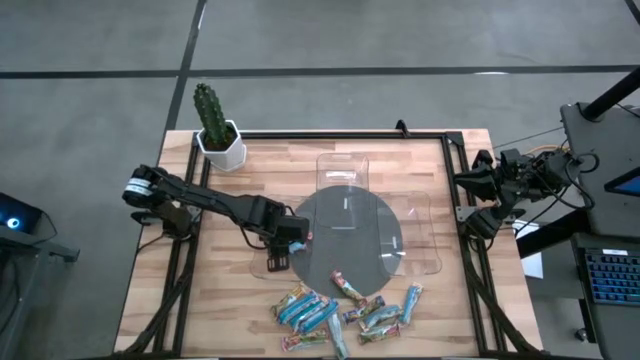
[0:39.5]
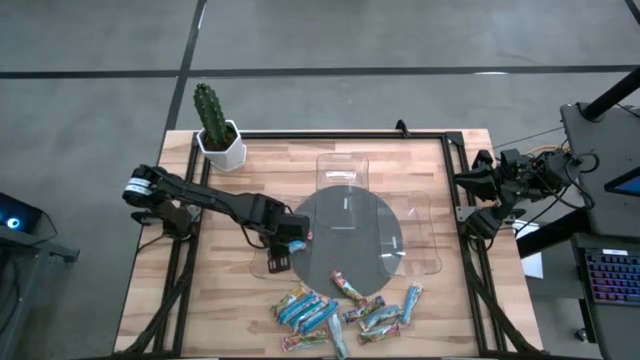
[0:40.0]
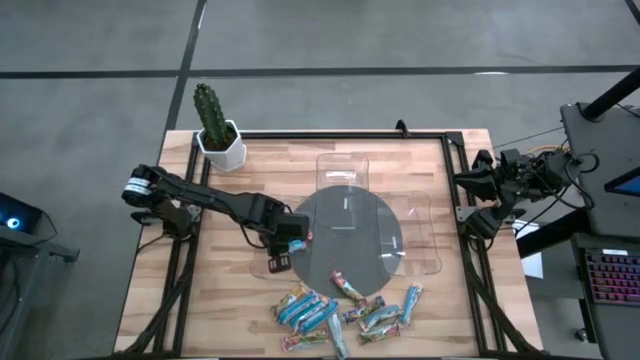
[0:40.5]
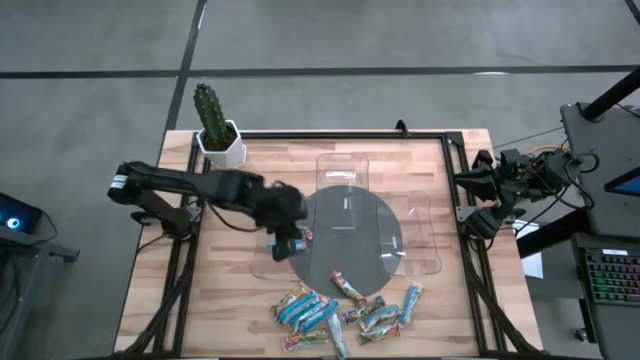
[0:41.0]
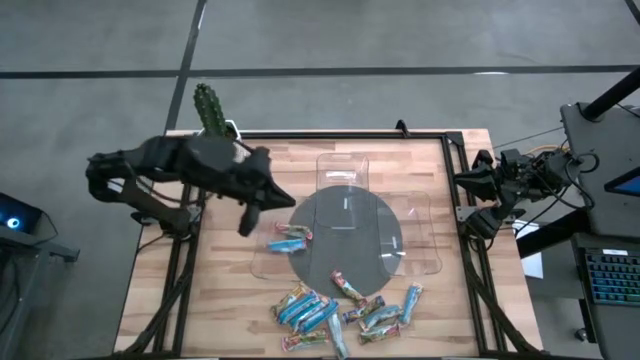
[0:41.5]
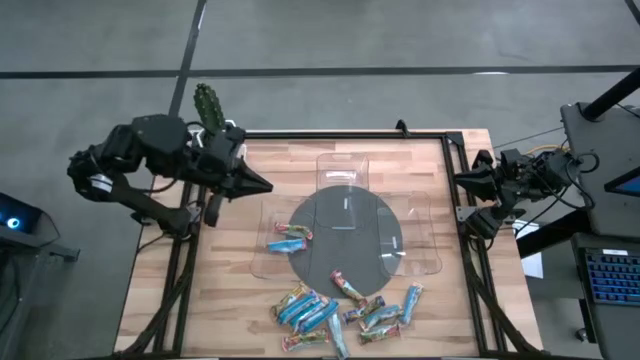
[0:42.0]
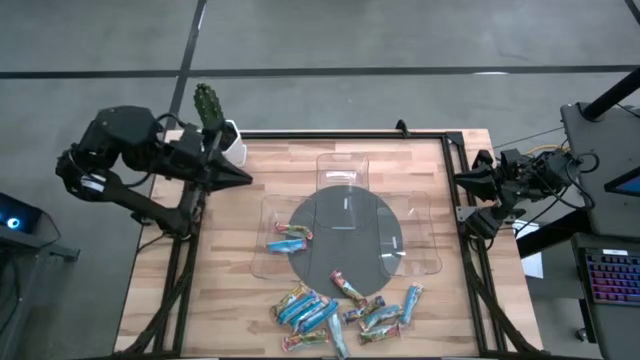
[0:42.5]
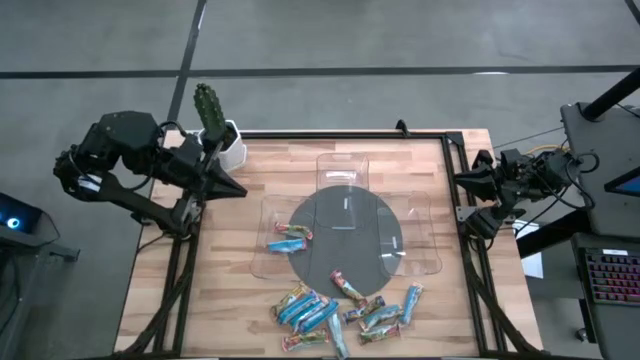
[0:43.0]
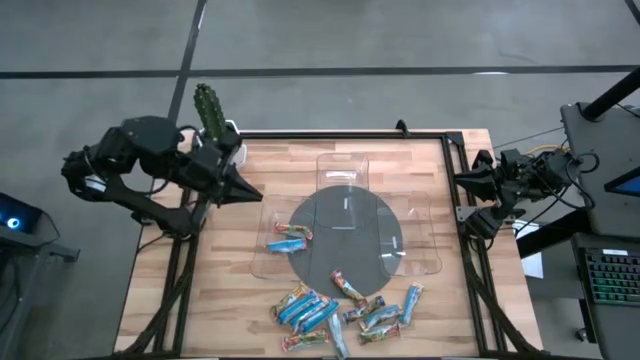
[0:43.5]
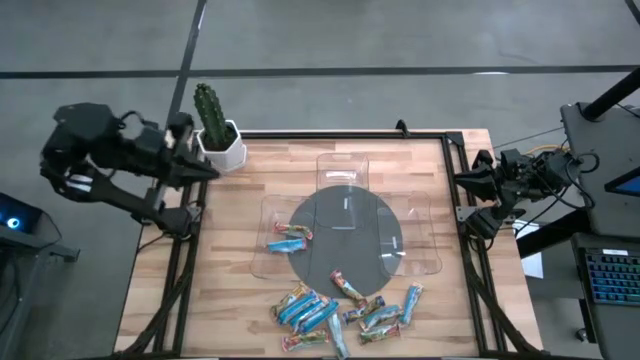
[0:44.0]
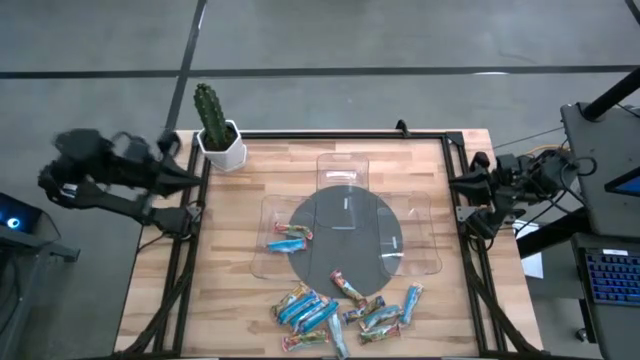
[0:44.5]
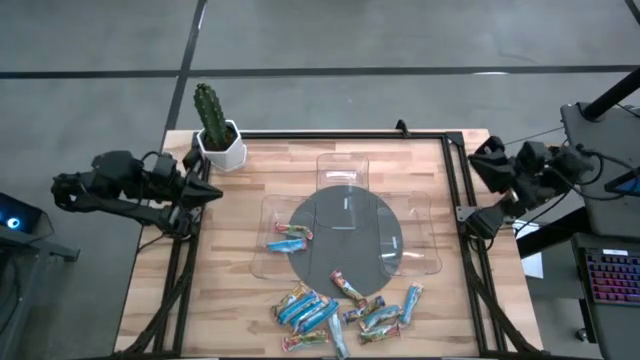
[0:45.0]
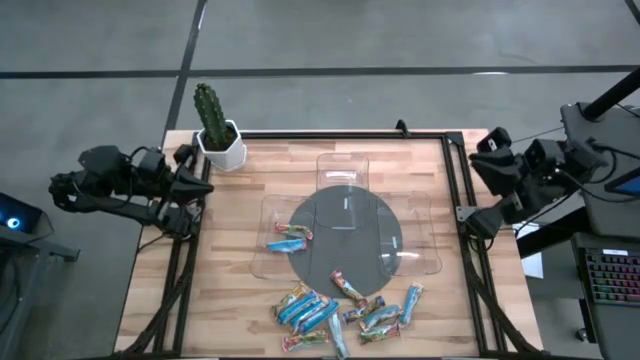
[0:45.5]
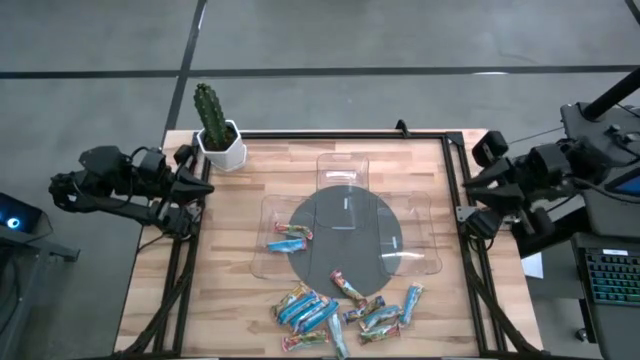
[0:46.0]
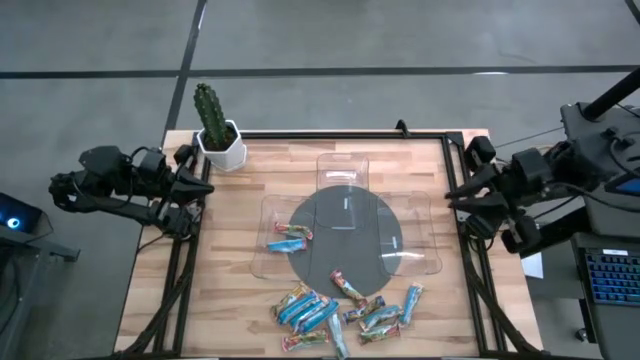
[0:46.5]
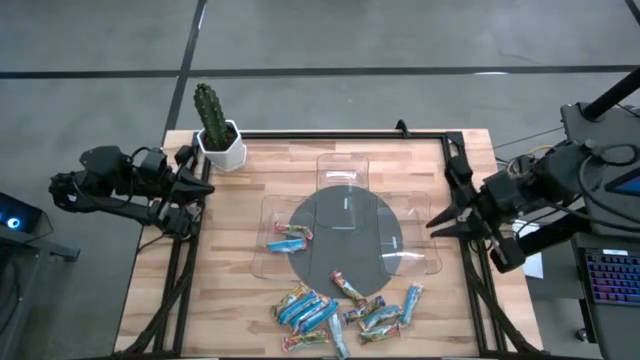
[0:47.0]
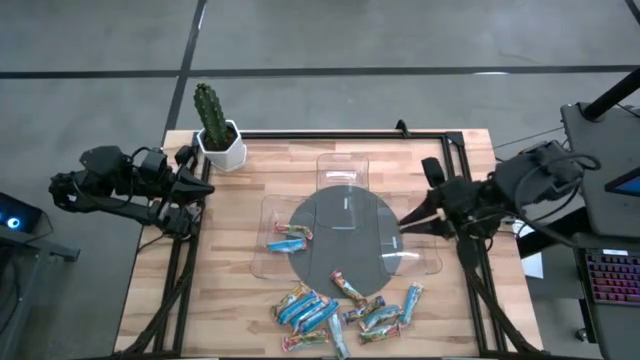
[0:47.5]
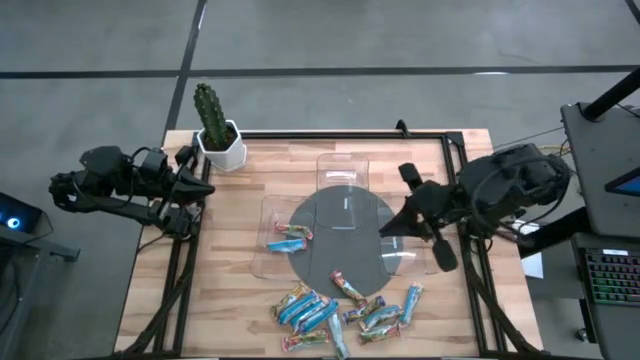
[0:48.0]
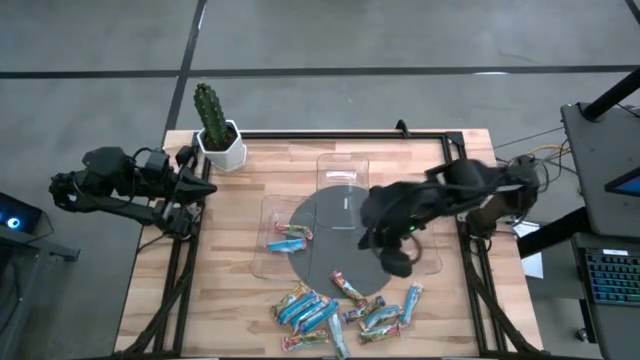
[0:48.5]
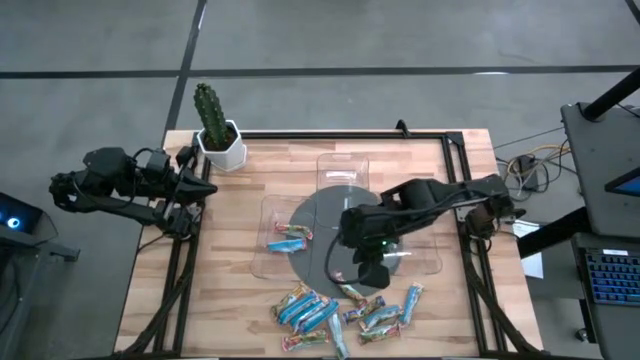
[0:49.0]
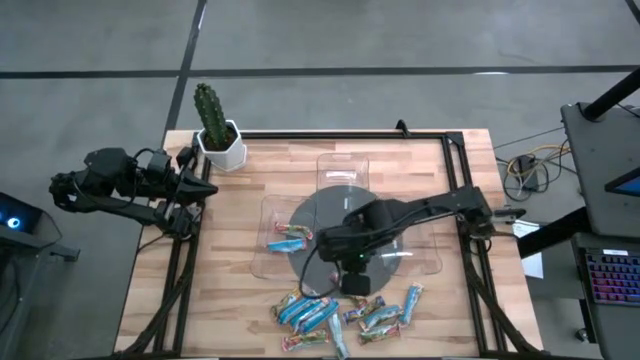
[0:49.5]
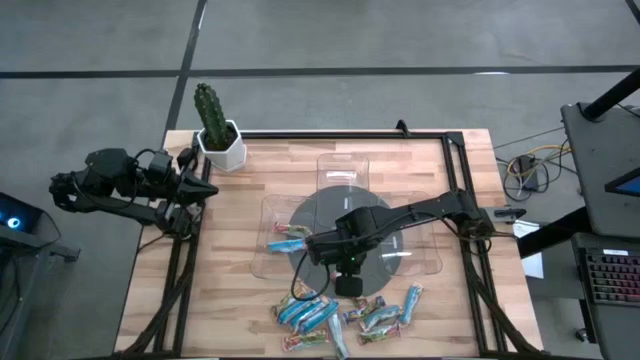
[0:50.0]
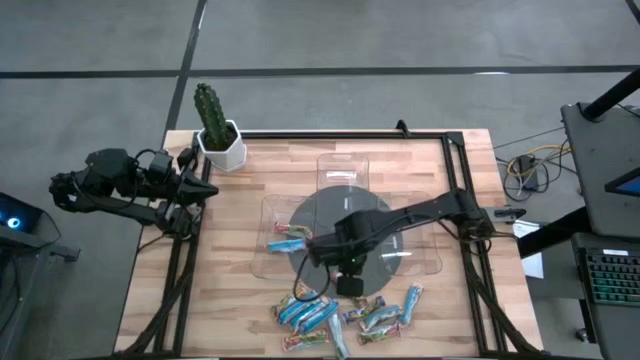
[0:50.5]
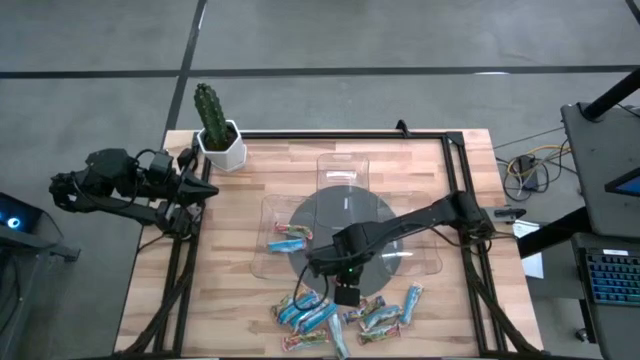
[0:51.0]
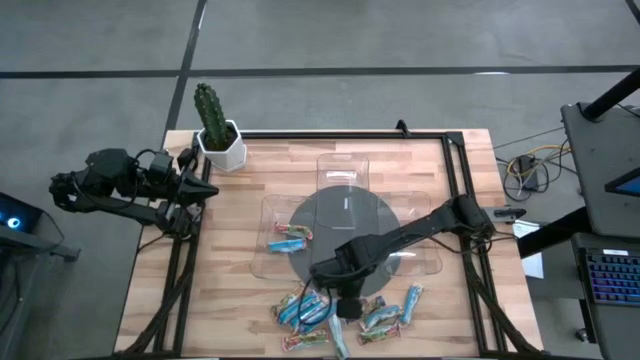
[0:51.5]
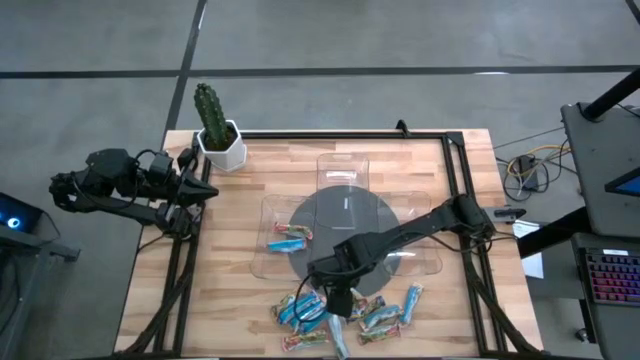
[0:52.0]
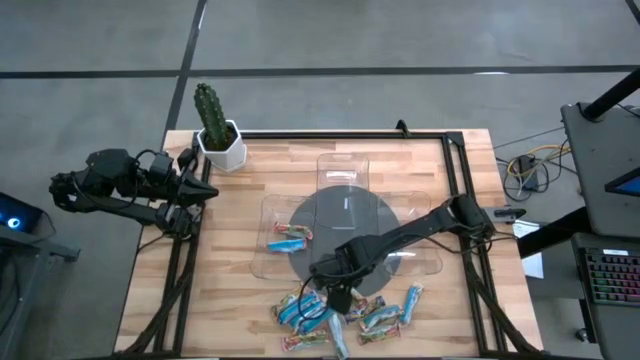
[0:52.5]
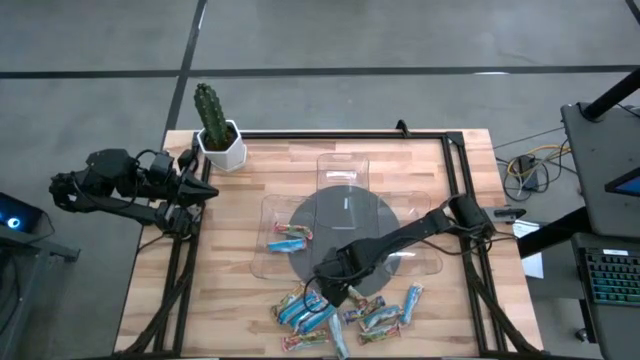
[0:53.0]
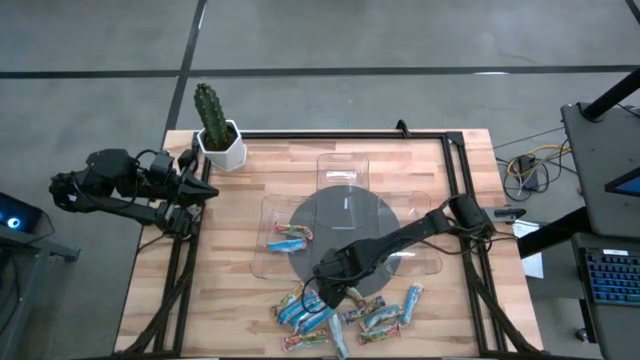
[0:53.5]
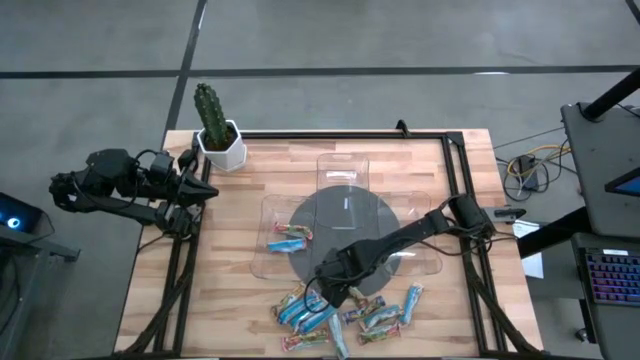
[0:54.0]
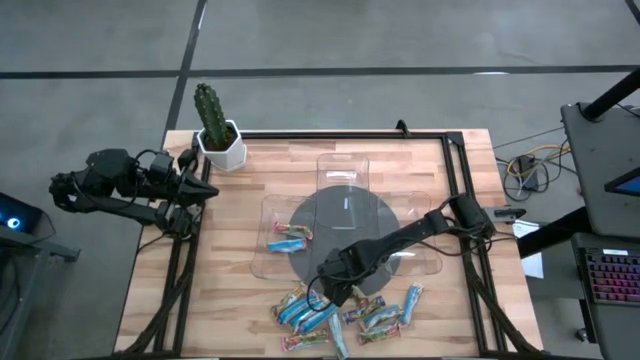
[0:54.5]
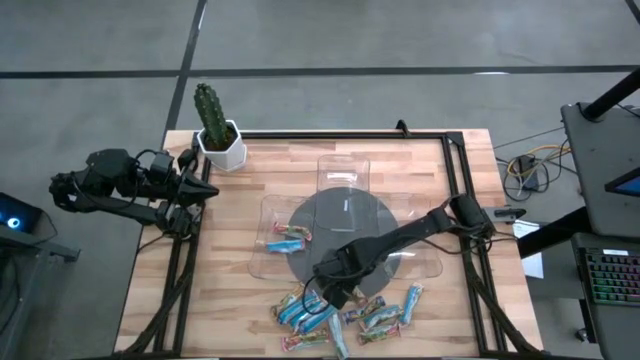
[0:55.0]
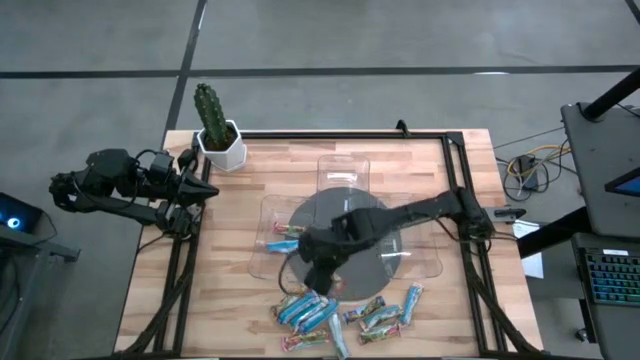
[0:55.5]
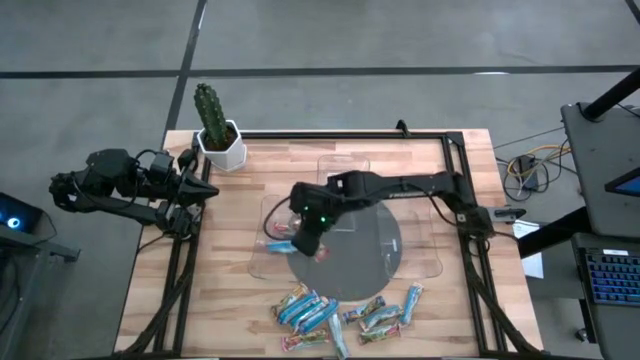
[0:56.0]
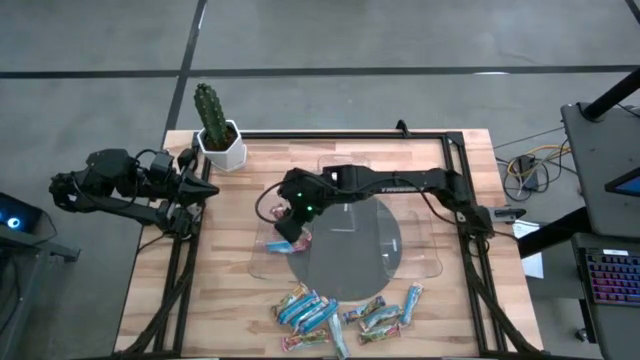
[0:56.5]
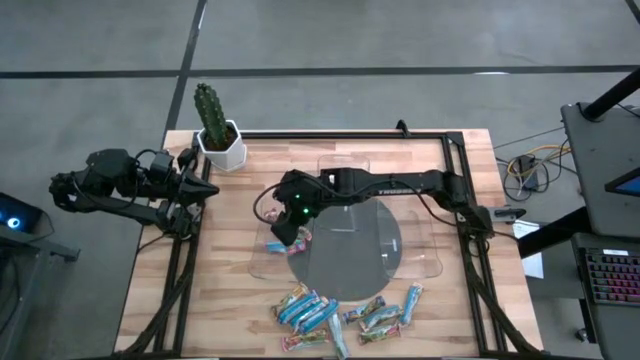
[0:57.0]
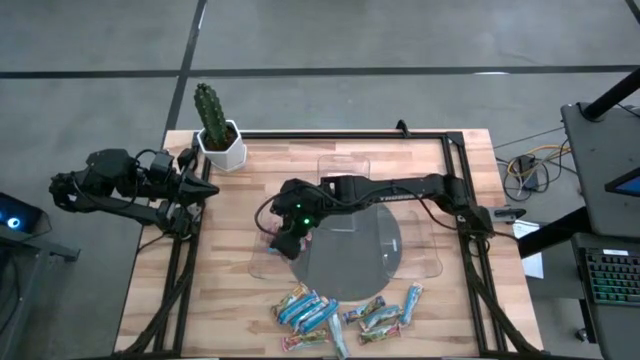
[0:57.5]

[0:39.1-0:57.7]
Task: Pick and place Granola Bars by type
Put the red granola bar into the left transparent bin
